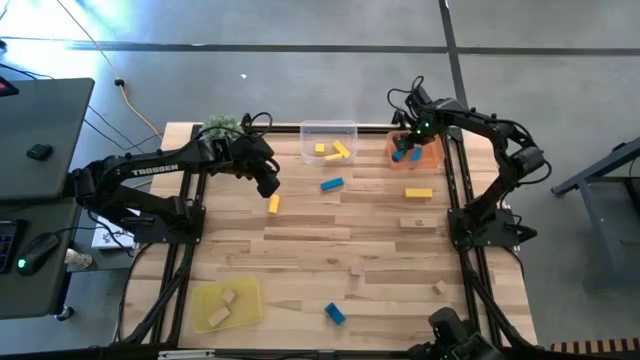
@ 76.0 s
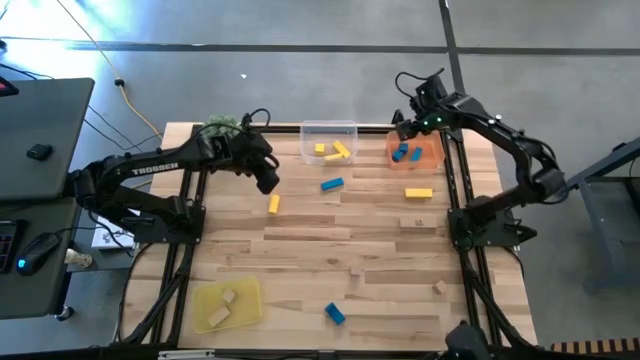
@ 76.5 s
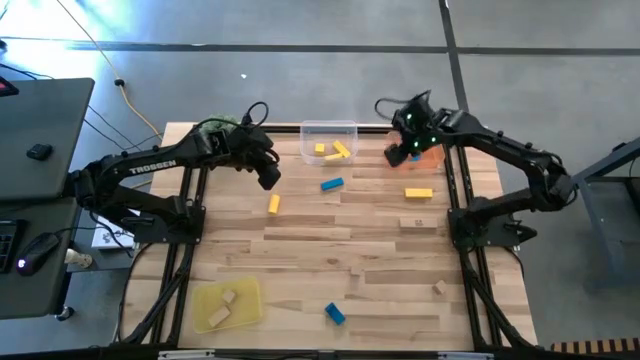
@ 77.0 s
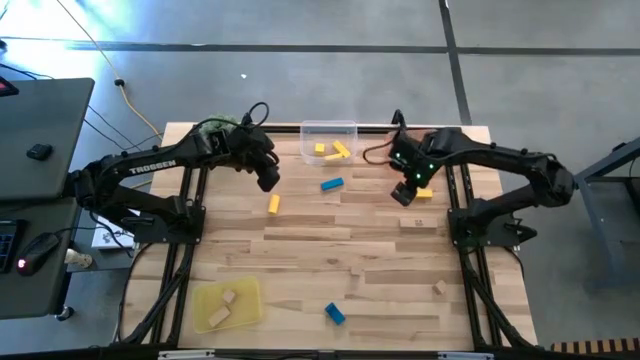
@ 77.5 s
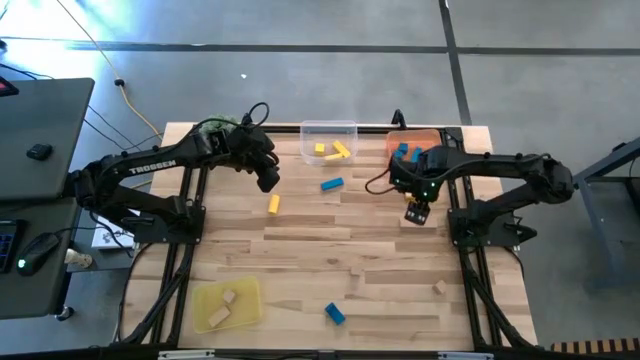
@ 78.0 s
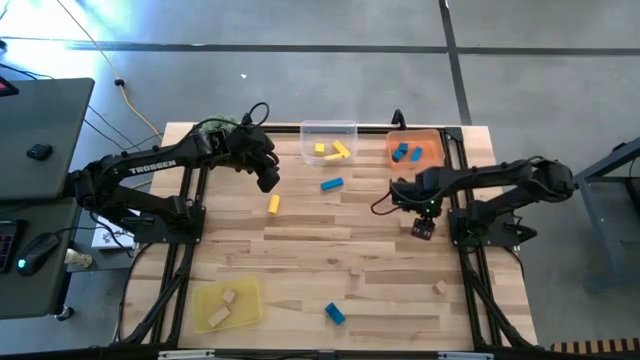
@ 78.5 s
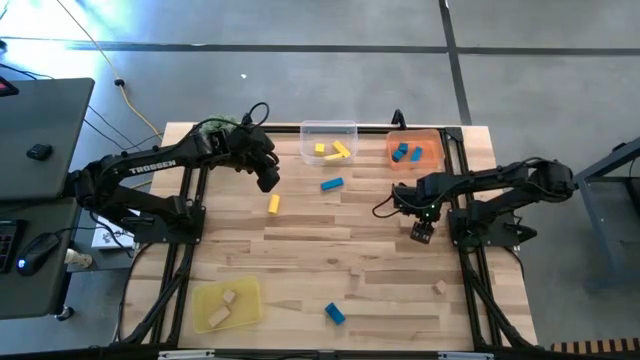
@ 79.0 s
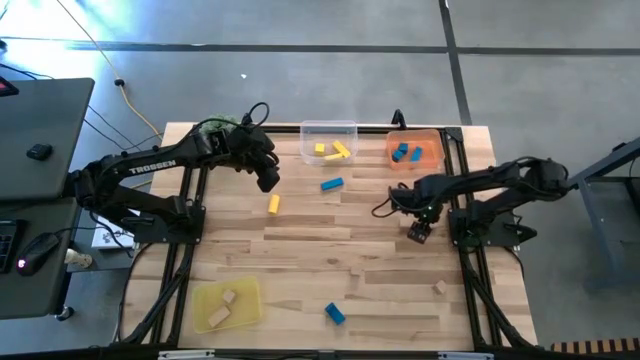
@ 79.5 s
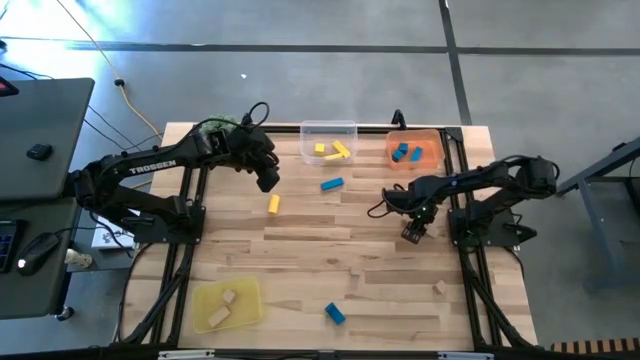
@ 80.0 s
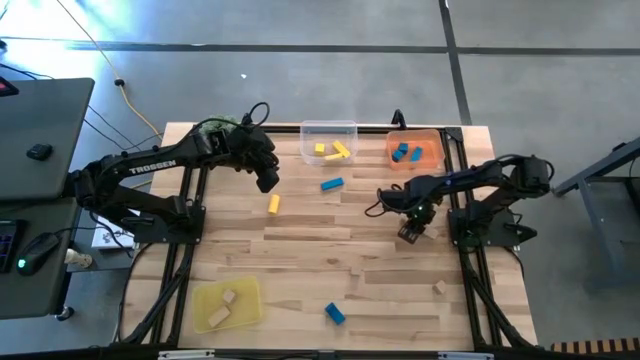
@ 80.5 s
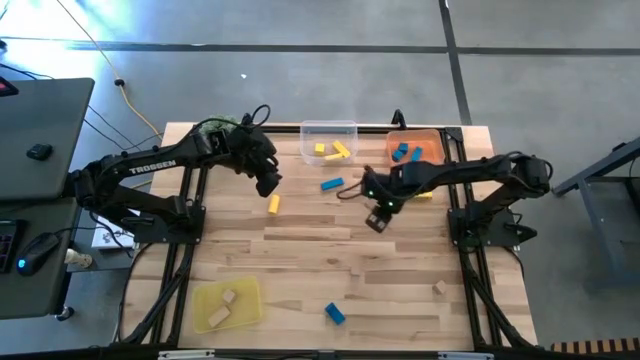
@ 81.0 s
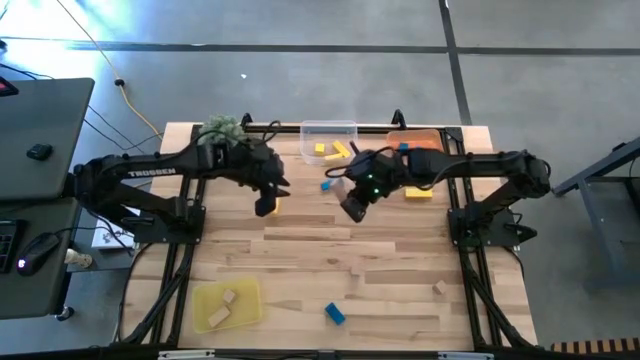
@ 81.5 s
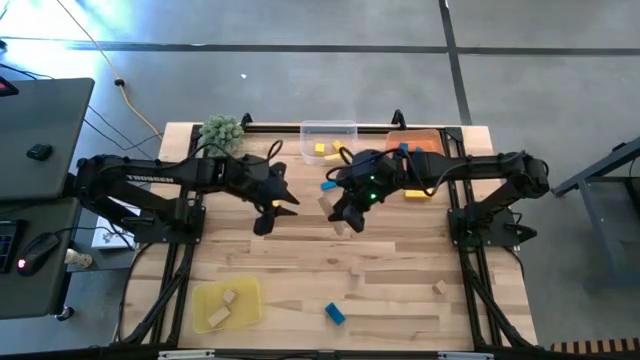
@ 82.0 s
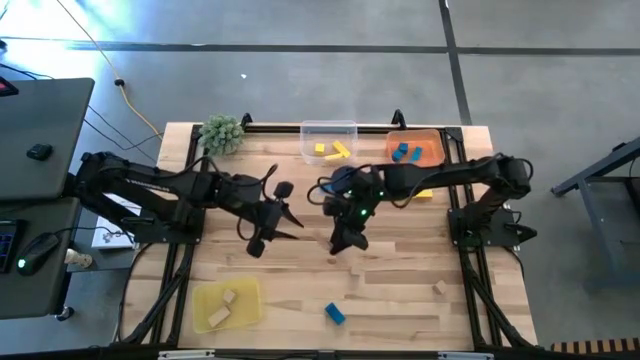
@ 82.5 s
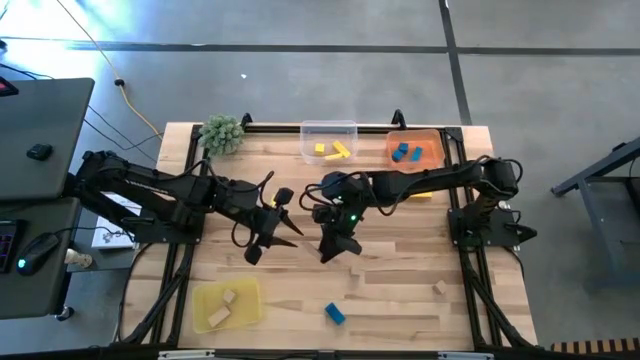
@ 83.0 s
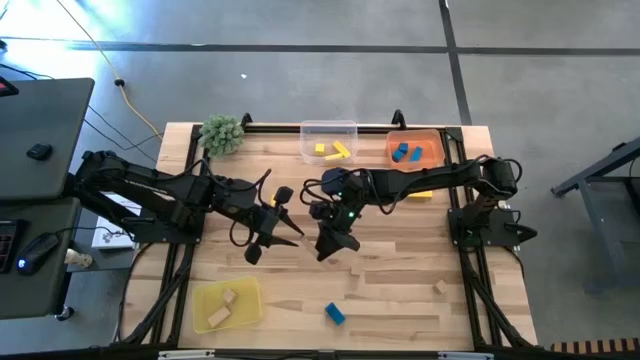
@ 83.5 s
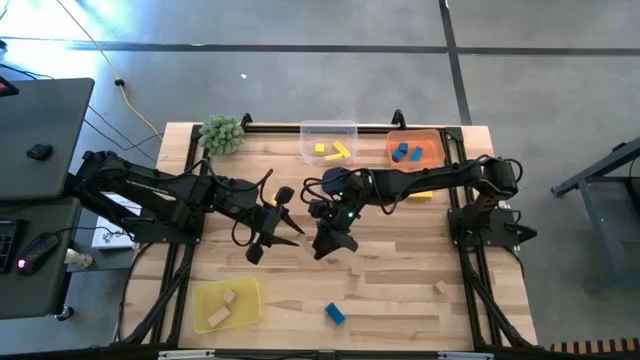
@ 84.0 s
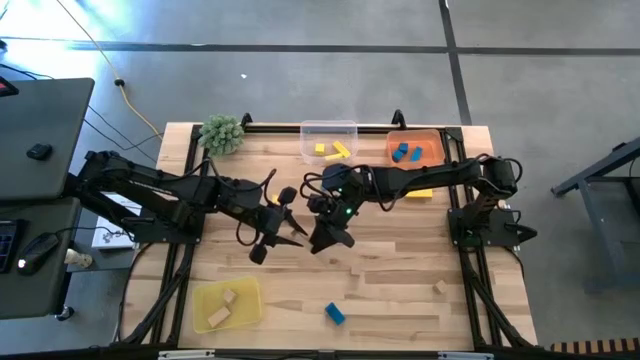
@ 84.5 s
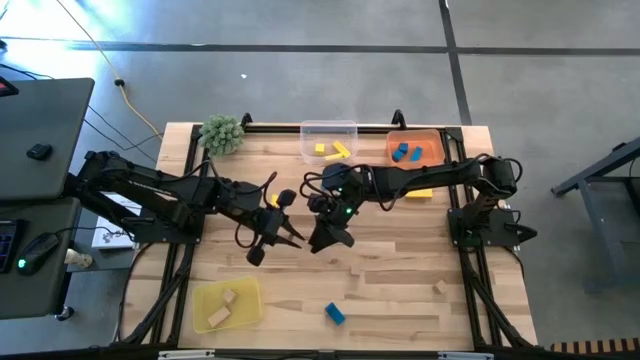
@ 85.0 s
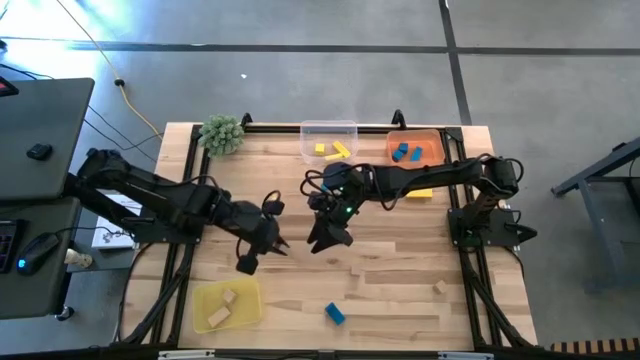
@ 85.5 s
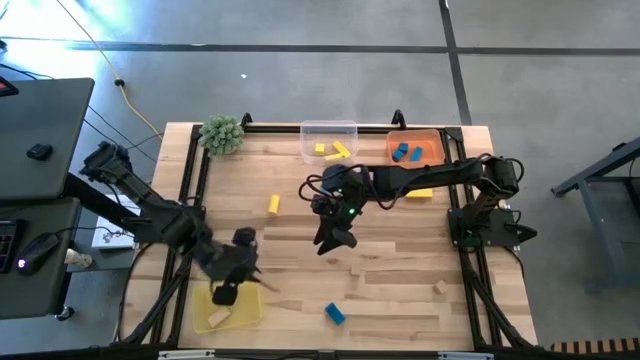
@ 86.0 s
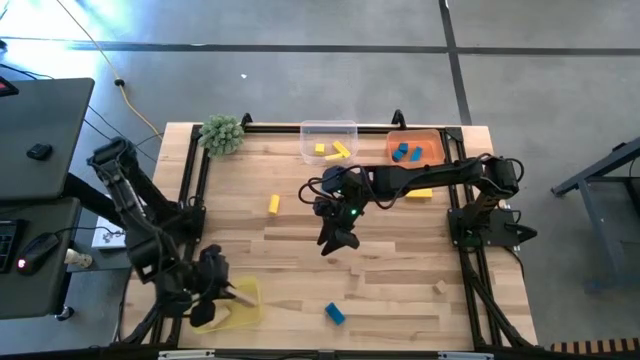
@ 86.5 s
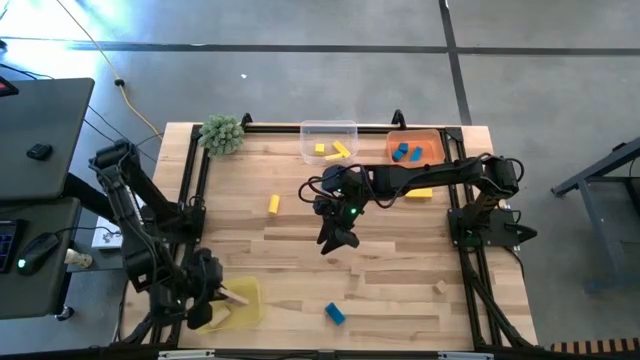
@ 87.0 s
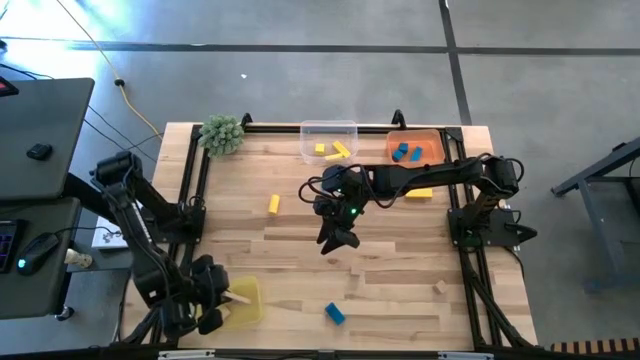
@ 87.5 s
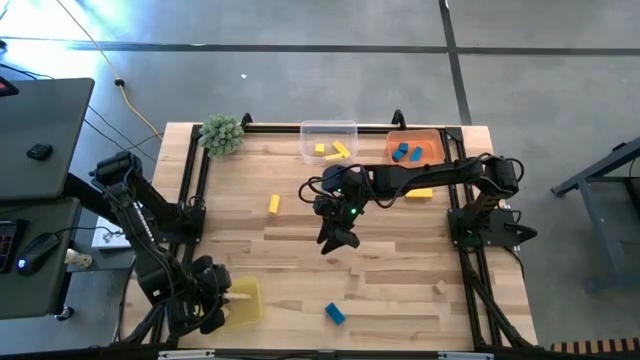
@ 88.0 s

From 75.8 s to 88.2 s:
Task: Sort & place blocks by color
Put the brown block into the yellow bin

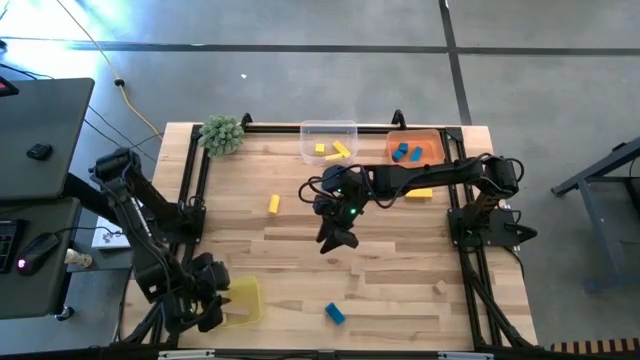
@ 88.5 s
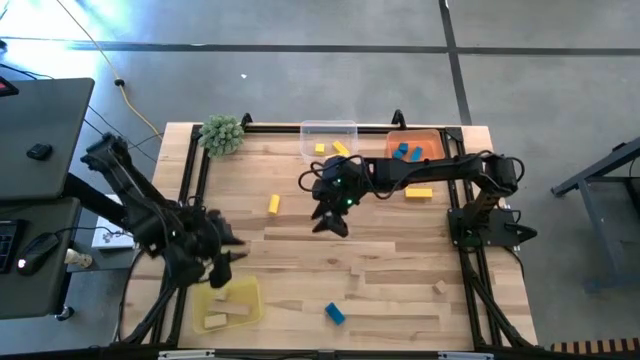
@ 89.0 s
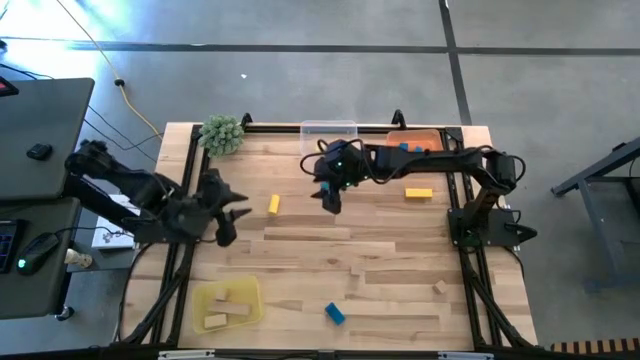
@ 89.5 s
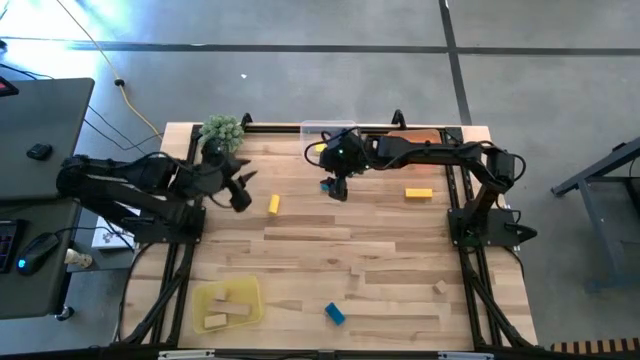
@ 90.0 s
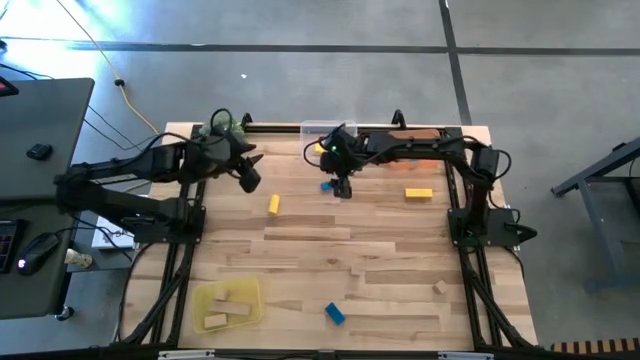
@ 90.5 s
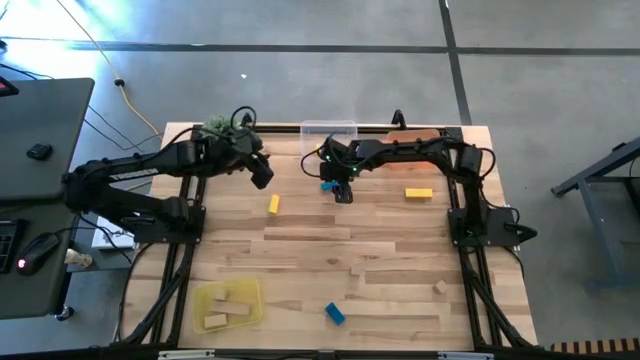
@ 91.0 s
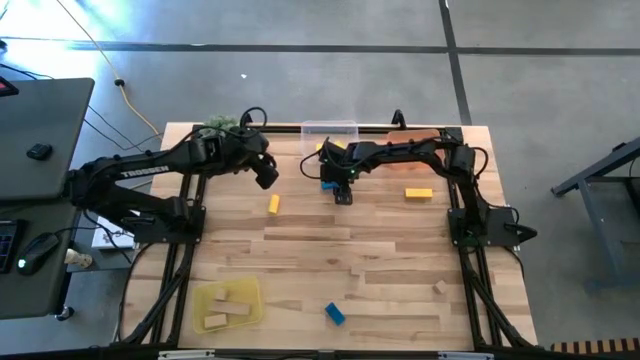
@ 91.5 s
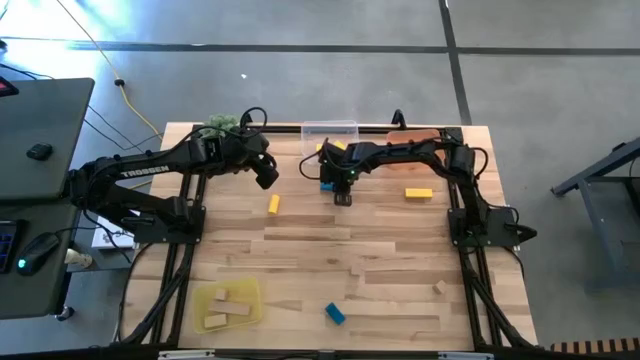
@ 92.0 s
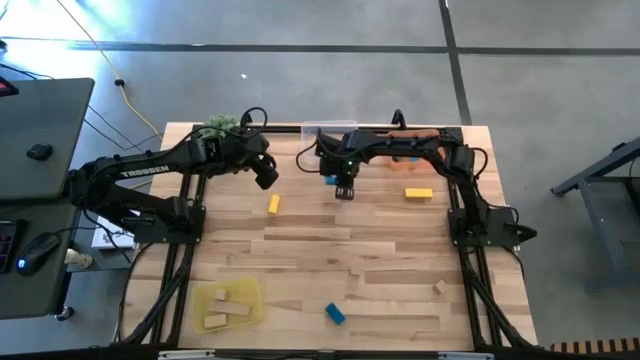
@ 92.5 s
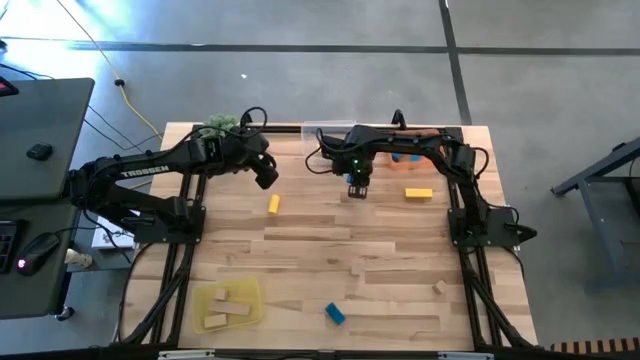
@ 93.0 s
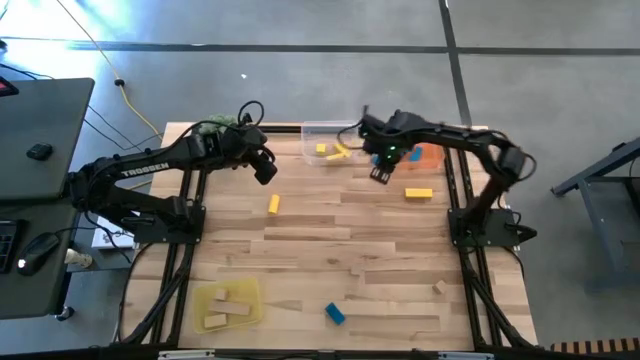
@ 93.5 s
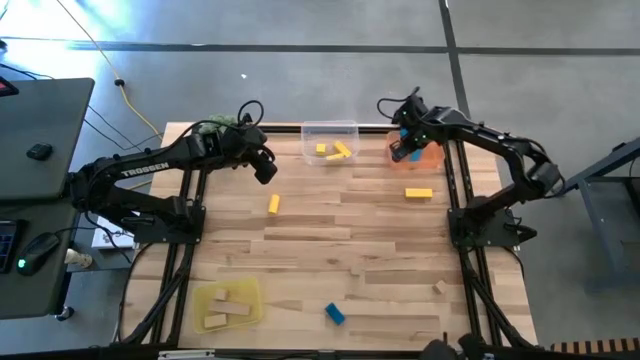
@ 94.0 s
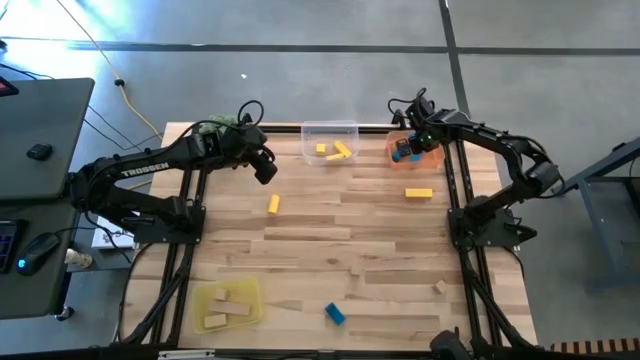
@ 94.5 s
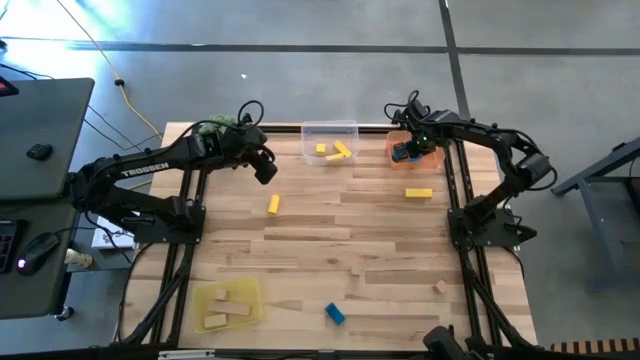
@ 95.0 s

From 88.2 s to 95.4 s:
Put the blue block into the orange bin
